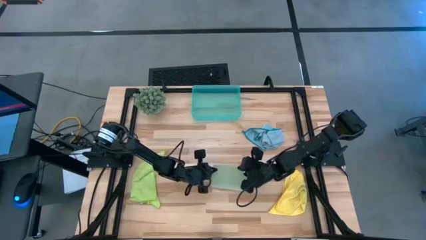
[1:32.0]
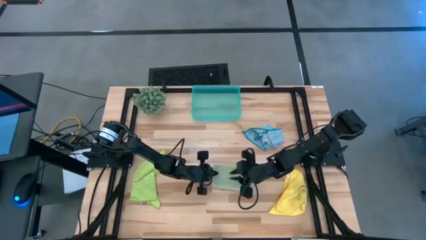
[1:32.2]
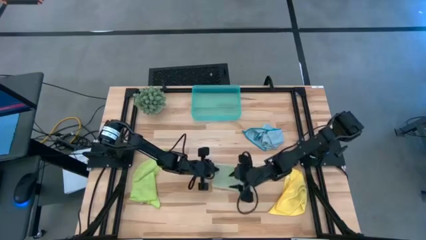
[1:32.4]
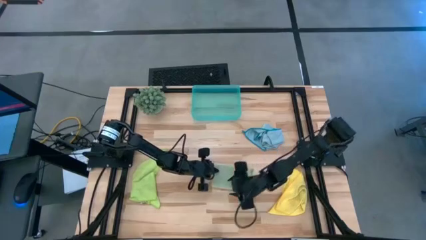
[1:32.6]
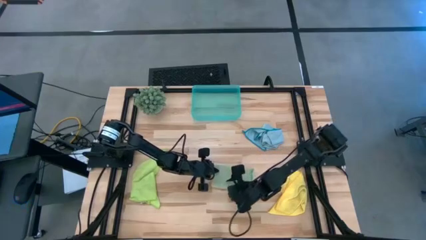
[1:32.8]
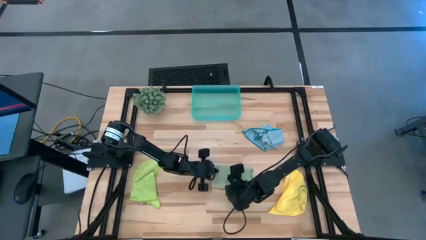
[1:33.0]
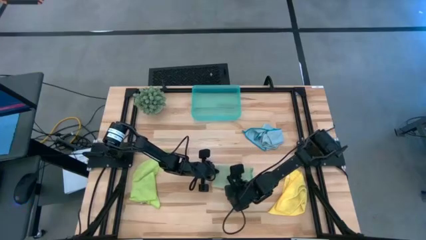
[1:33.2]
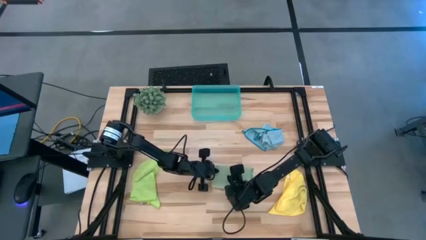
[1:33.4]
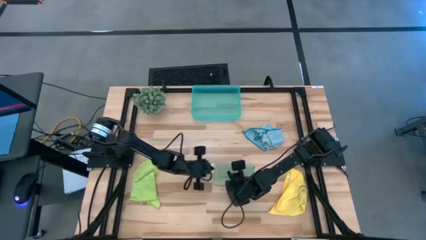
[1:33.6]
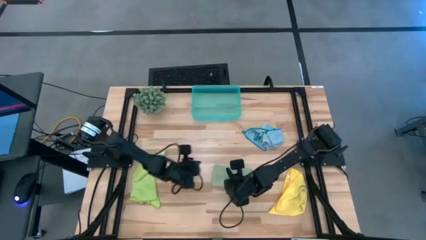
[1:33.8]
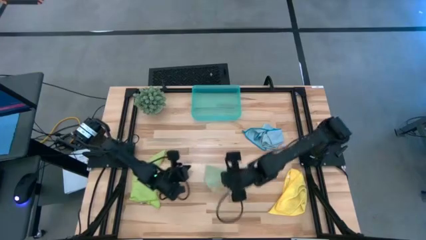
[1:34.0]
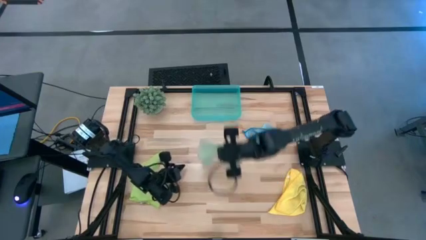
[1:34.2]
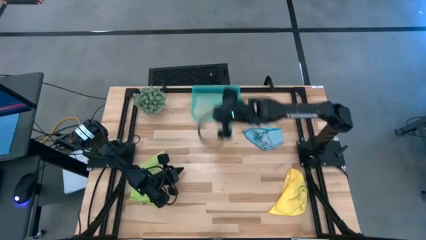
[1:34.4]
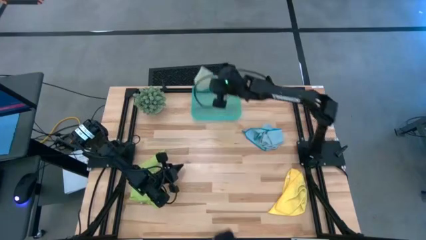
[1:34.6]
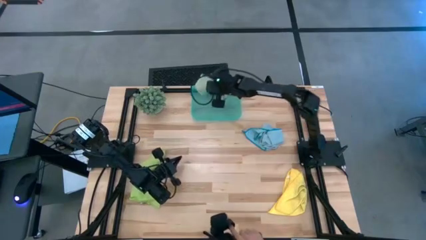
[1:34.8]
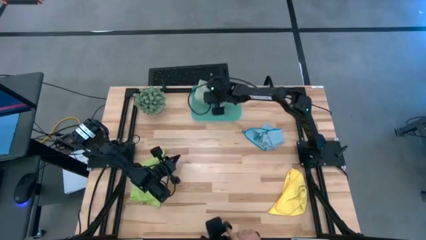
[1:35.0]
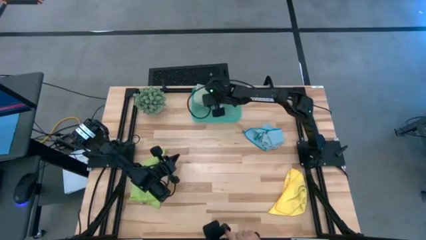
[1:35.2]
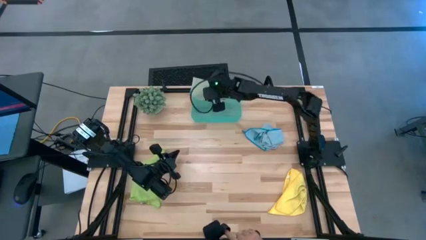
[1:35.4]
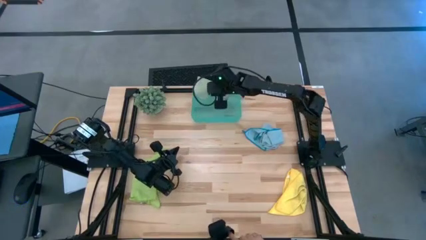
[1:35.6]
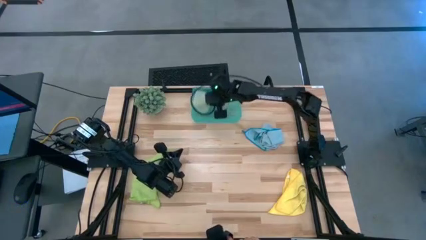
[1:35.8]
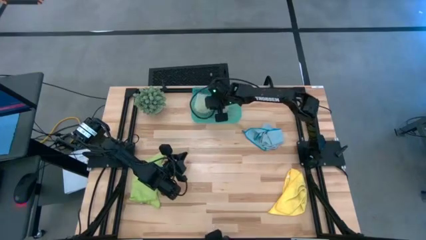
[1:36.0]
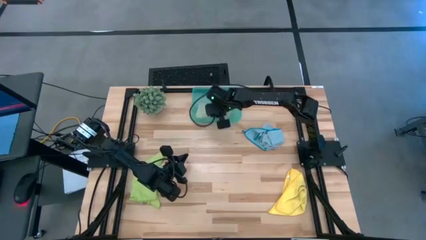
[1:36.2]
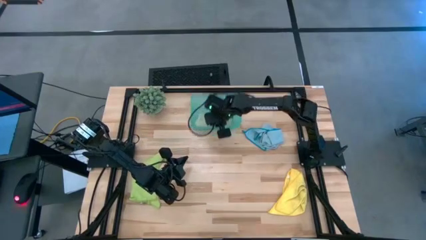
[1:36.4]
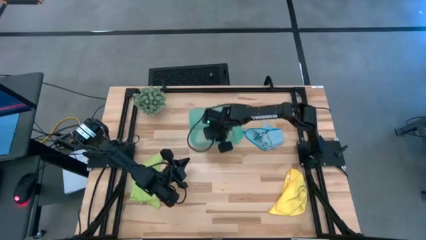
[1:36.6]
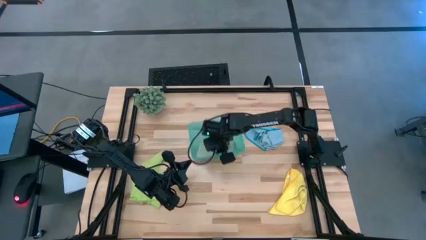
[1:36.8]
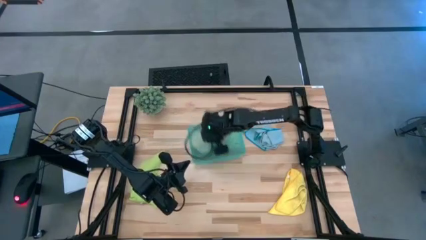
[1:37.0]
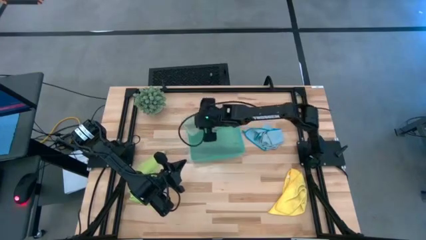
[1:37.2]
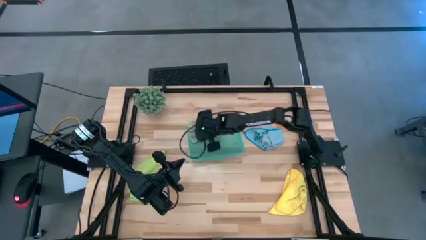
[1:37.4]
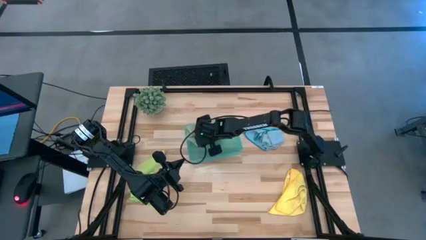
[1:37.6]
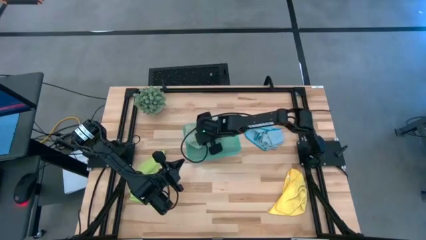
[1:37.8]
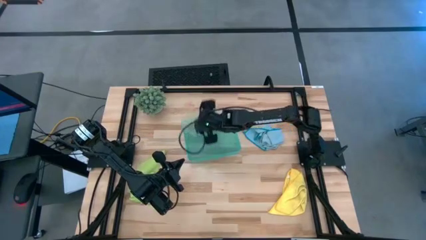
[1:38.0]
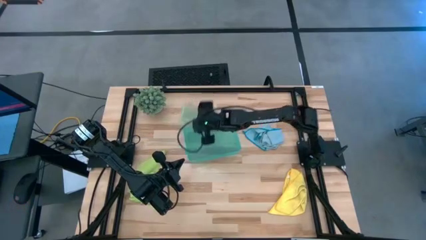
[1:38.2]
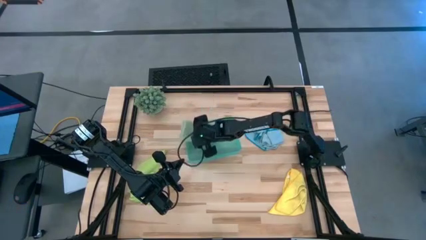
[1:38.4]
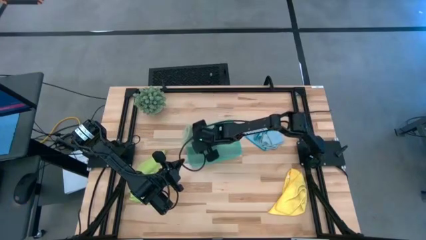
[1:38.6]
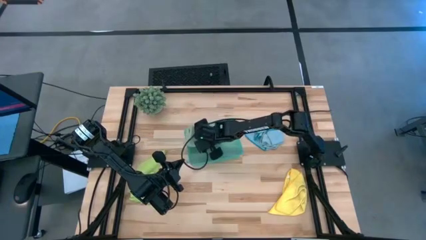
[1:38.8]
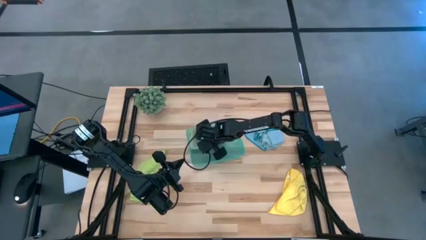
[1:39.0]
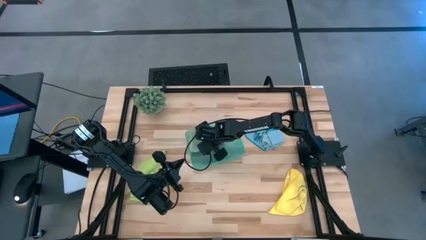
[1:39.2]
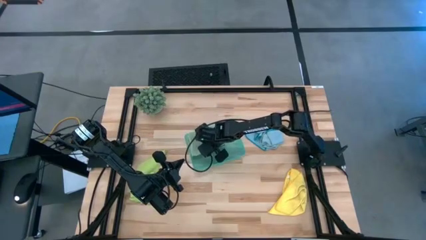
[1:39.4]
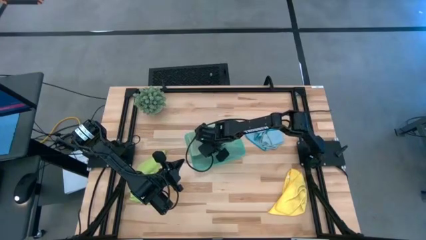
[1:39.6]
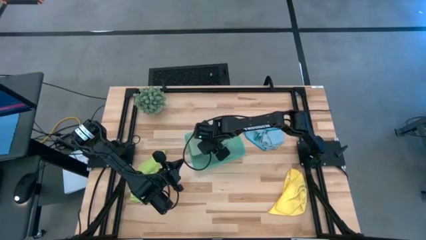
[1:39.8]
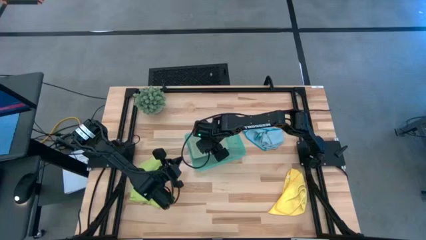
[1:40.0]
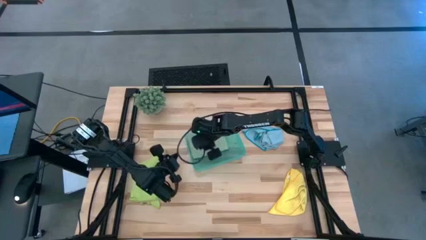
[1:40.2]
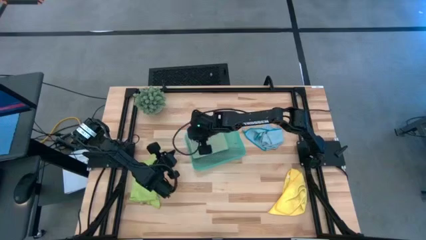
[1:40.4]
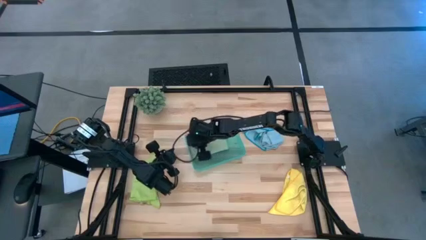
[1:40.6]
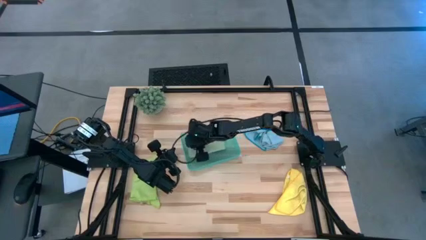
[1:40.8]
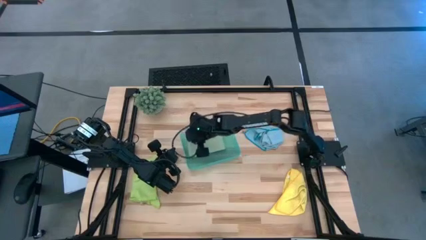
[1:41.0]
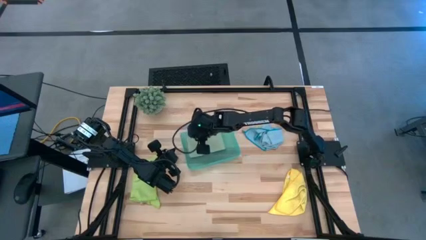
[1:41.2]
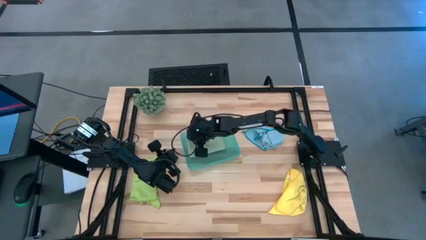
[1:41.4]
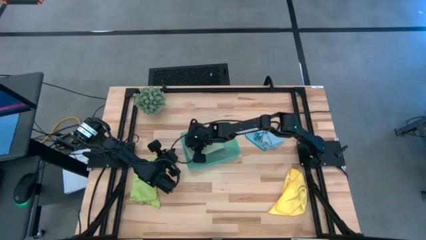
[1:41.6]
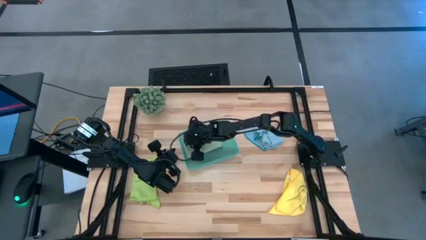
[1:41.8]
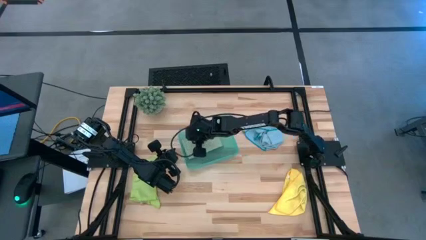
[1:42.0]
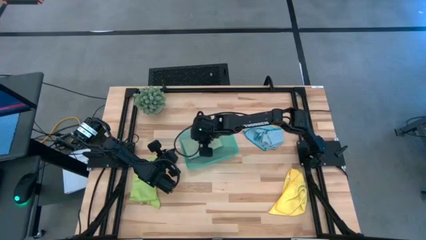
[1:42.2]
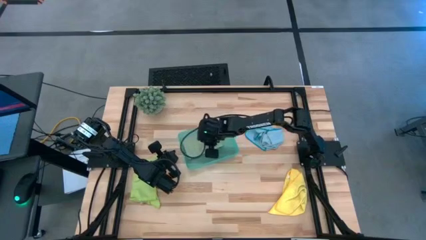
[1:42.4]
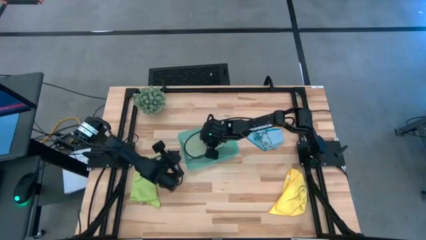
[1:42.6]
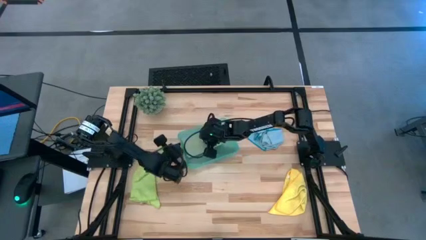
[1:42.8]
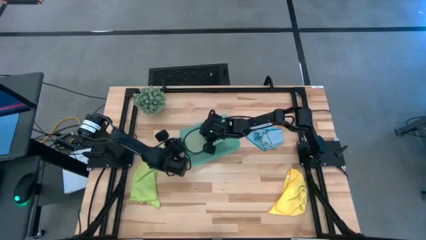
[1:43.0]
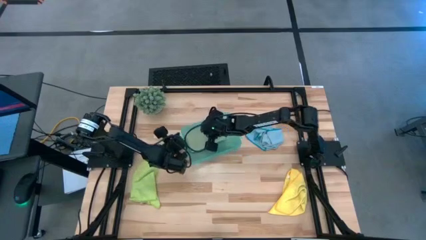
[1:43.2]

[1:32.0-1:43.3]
Task: Fold microfiber towels
Put the green towel into the bin

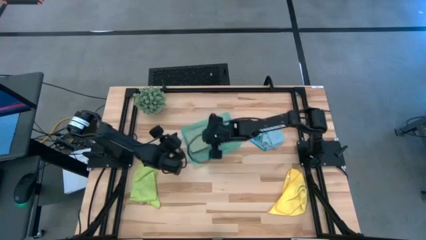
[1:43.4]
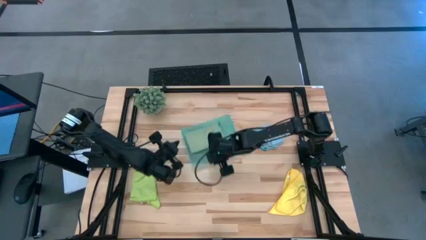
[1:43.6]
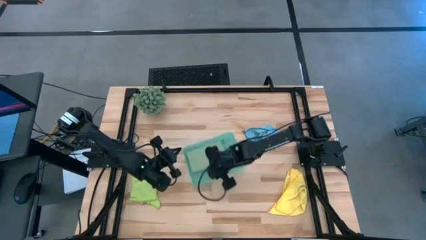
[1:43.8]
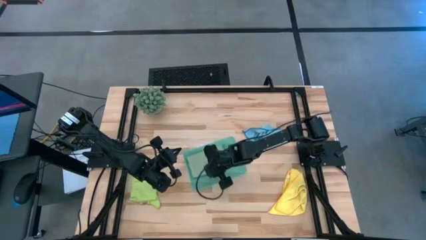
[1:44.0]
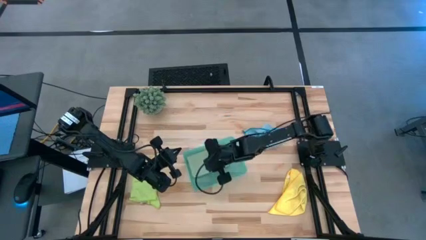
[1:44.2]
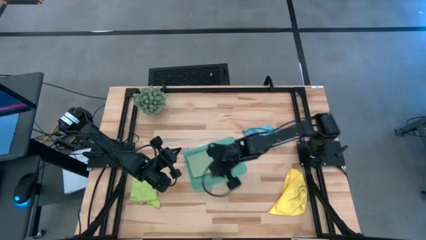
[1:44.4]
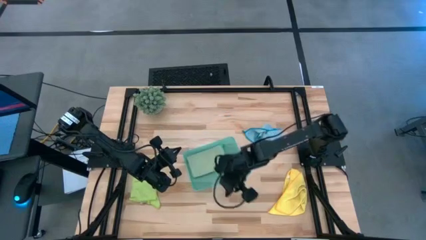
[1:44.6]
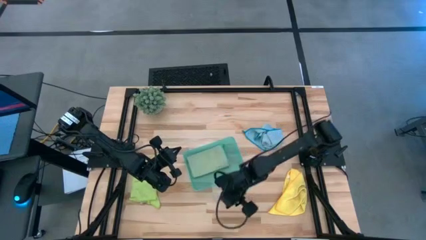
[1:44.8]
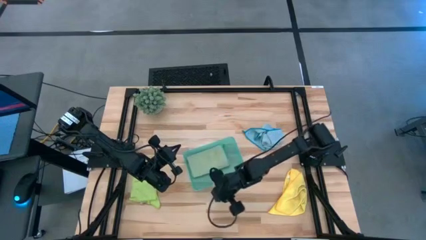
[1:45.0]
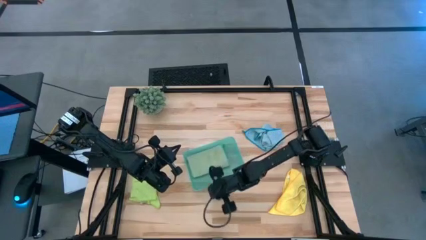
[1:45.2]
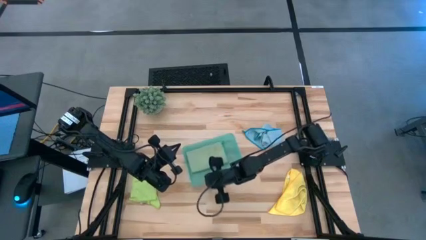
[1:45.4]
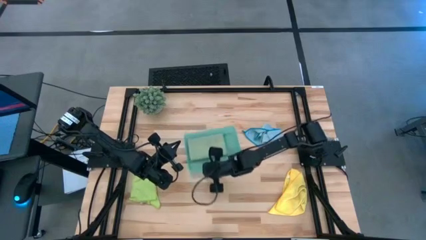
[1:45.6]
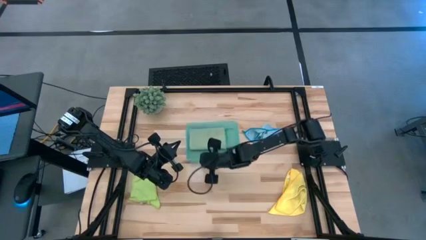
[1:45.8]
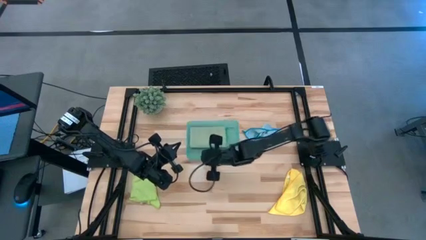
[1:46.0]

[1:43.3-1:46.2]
Adjust the bin

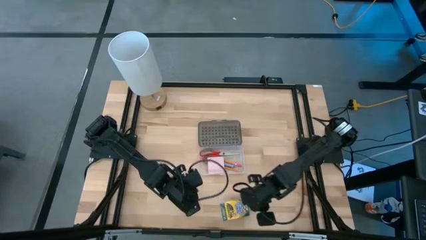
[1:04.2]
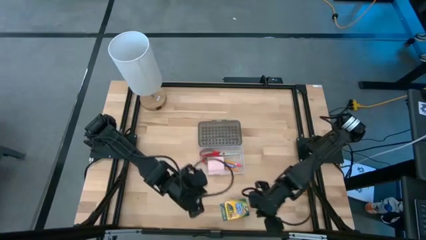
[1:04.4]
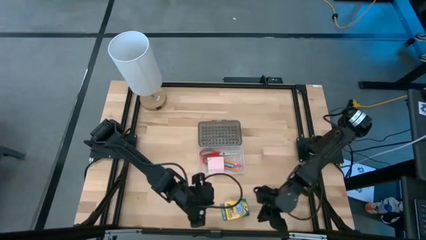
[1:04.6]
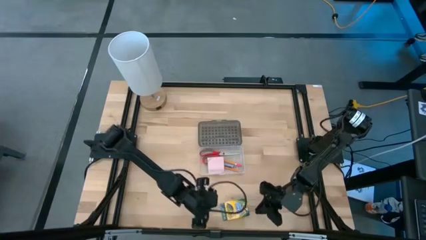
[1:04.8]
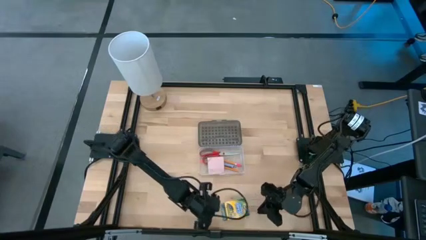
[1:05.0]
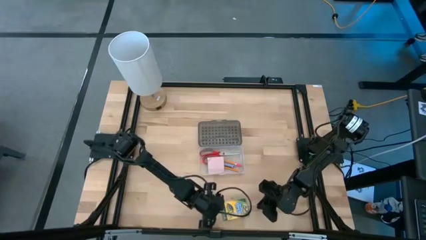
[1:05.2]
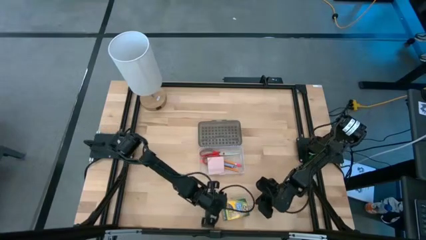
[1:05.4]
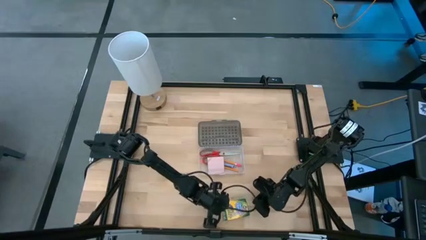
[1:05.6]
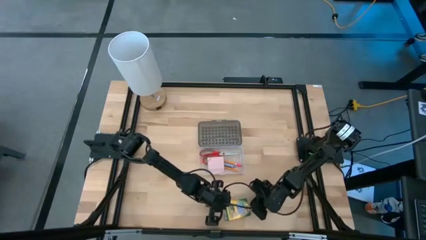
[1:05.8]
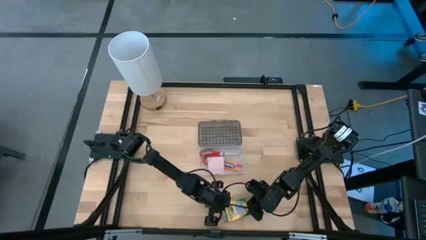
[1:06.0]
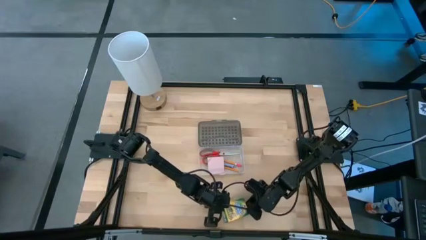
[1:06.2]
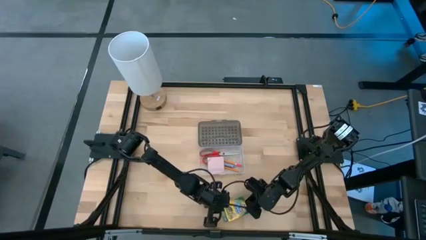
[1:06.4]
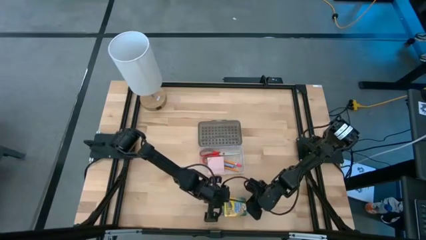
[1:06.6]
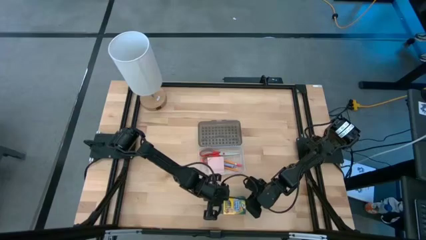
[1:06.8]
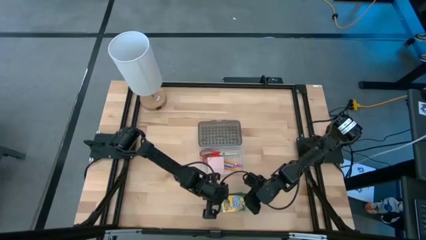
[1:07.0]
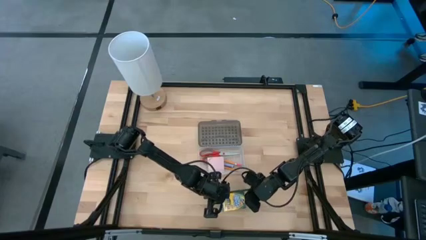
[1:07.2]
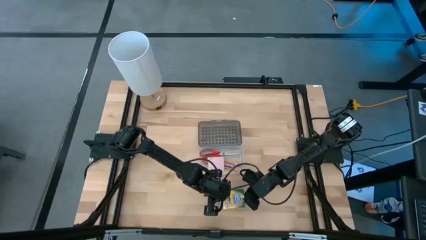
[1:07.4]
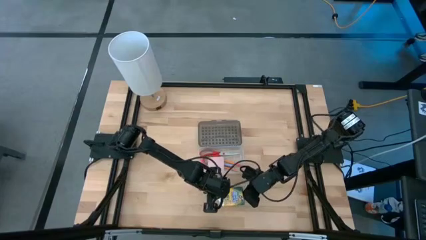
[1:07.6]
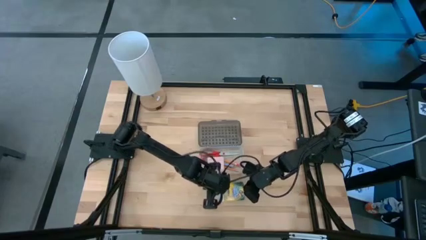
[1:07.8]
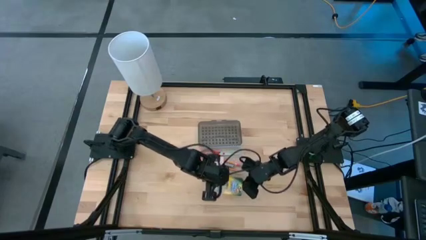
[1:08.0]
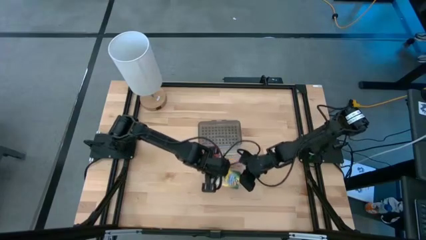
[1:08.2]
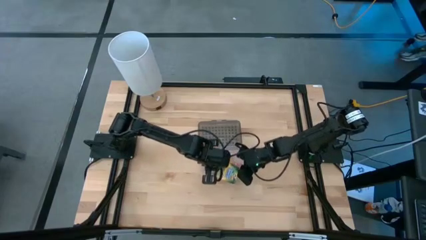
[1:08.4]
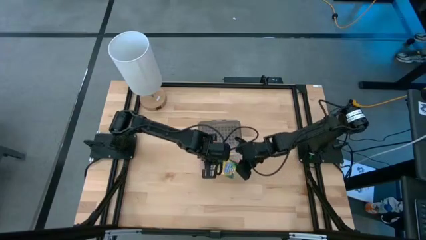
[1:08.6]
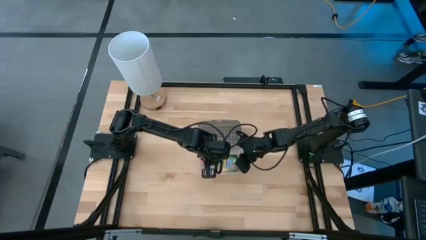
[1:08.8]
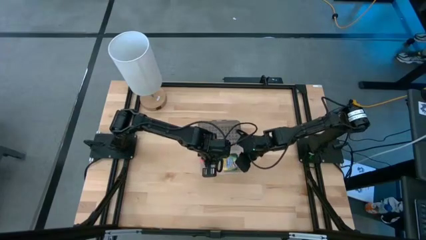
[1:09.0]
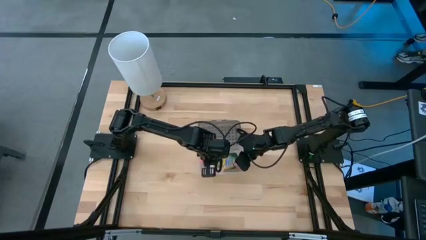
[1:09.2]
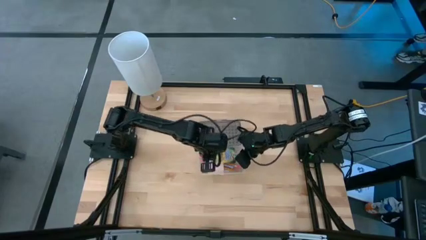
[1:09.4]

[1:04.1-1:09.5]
Task: Pack school essentials
Put the yellow crayon box into the transparent supply box
